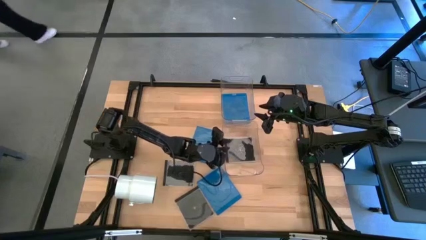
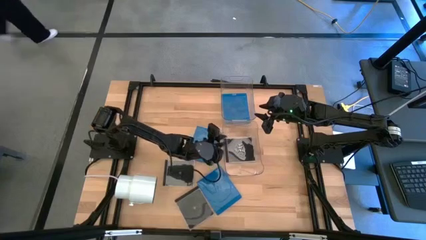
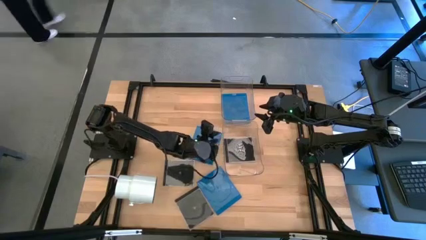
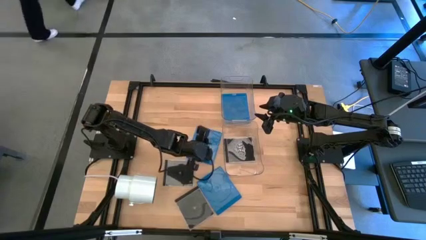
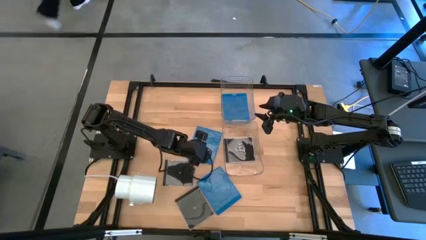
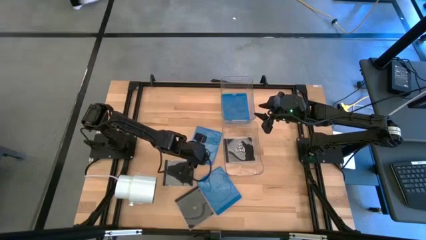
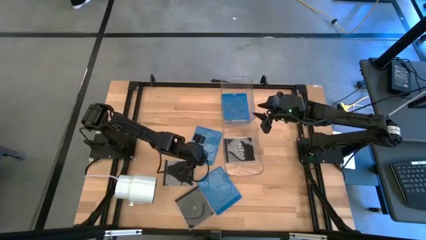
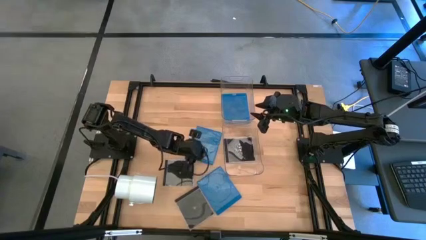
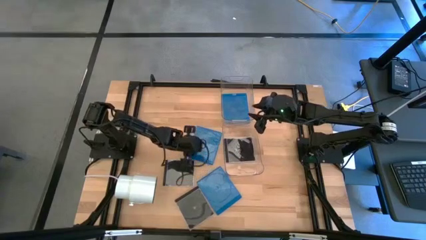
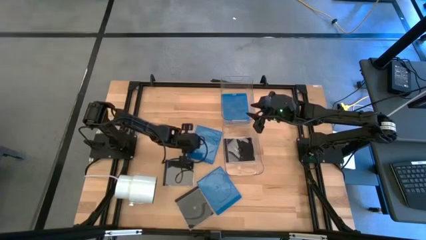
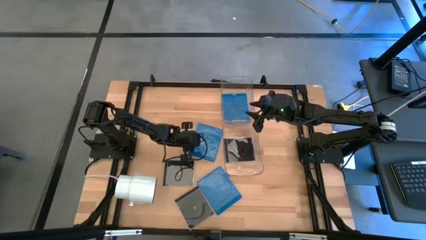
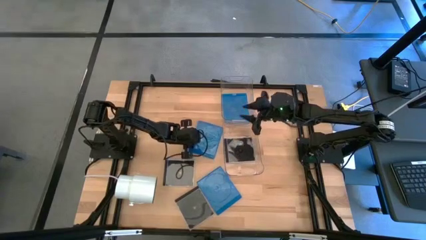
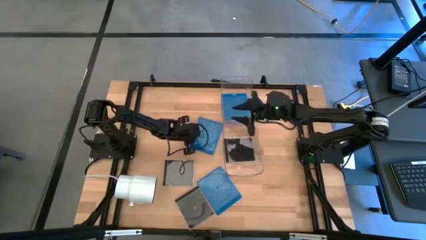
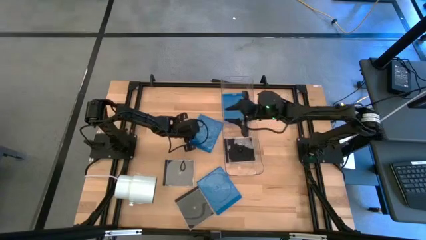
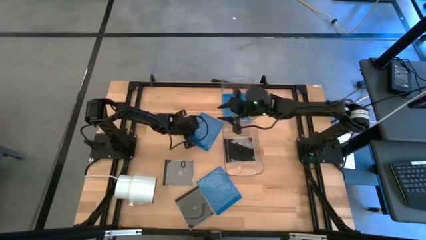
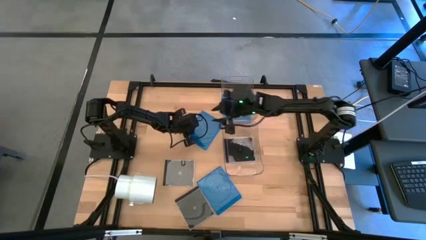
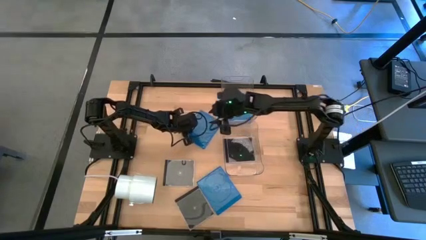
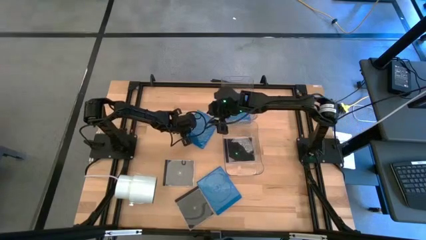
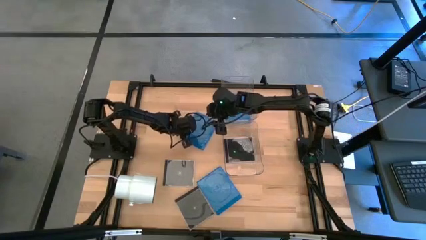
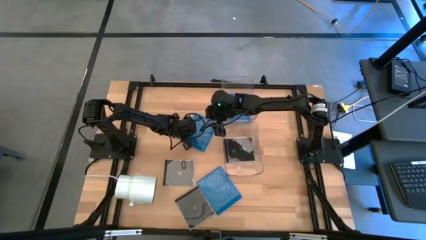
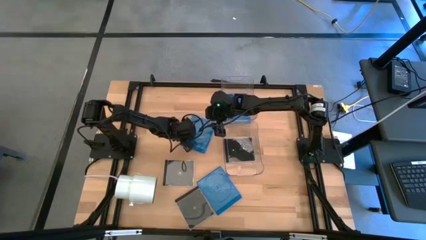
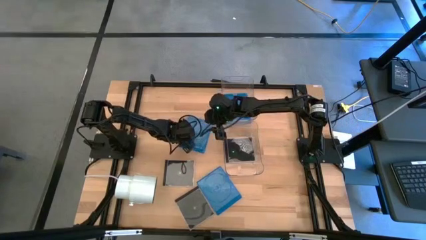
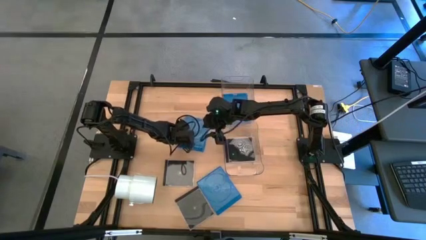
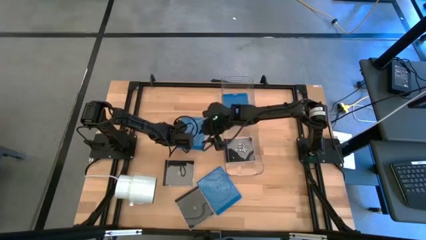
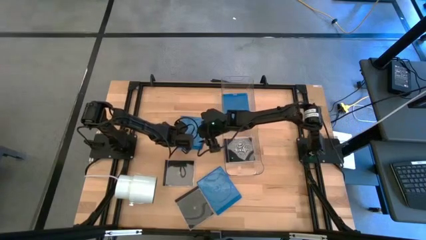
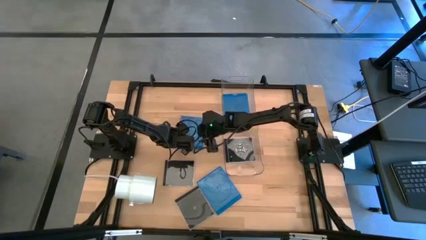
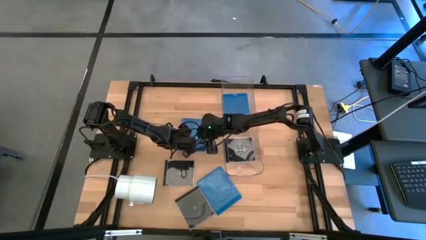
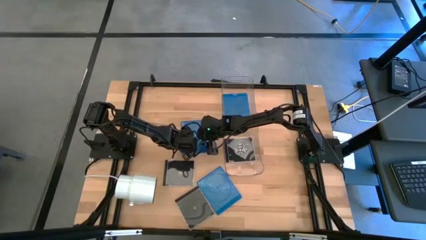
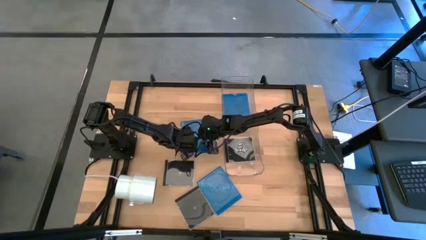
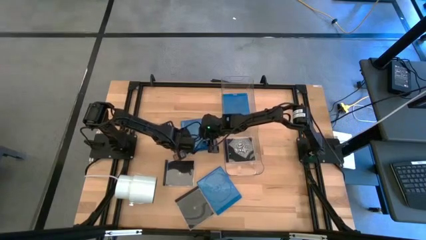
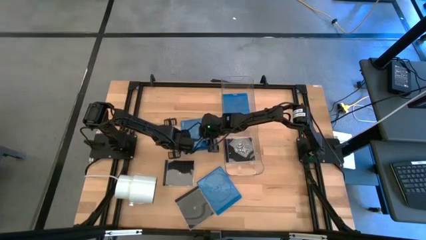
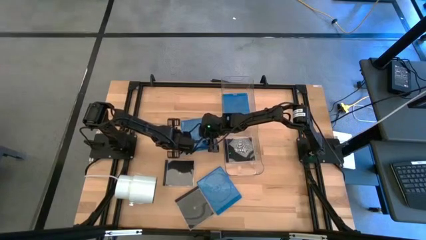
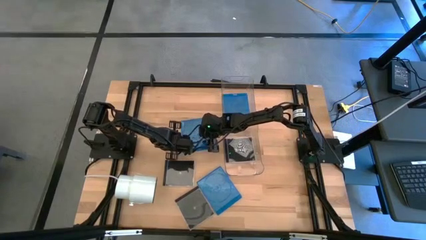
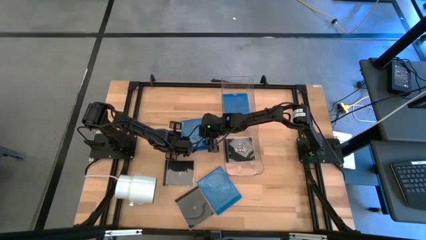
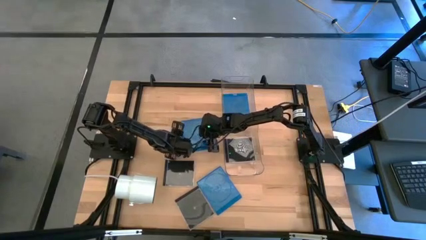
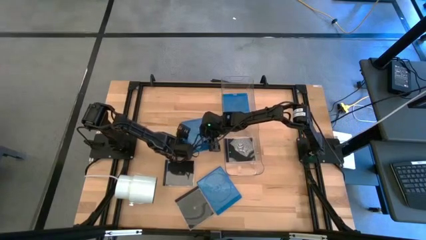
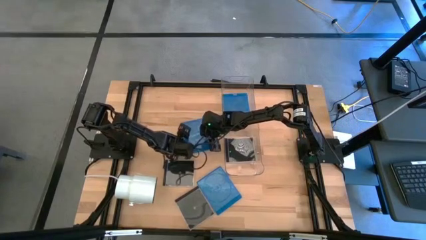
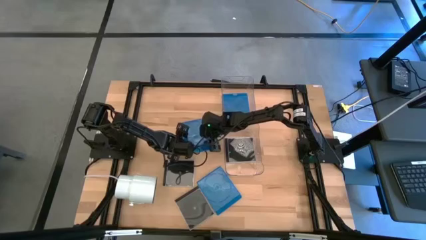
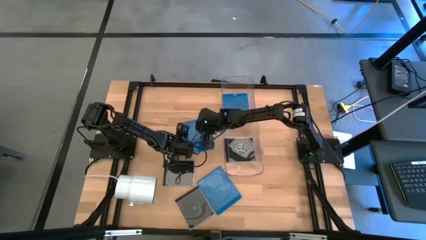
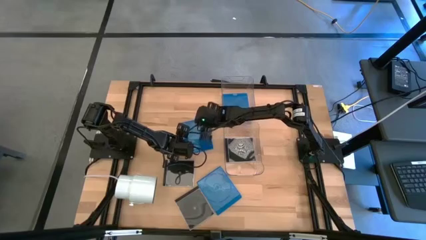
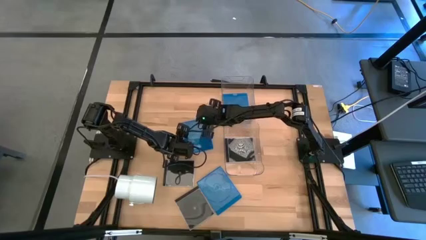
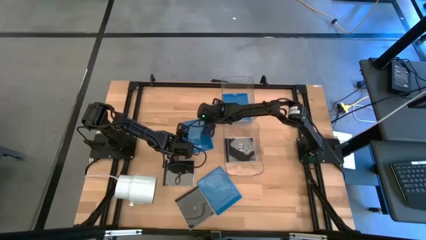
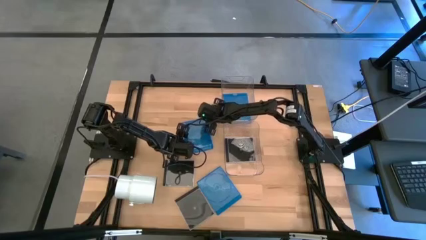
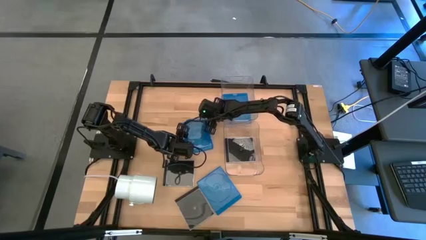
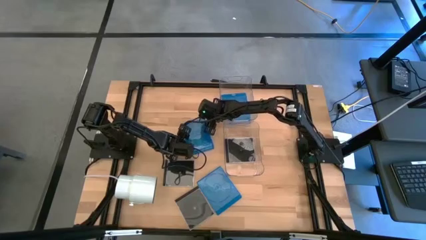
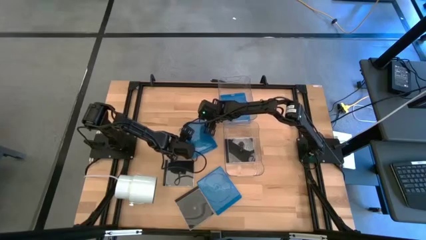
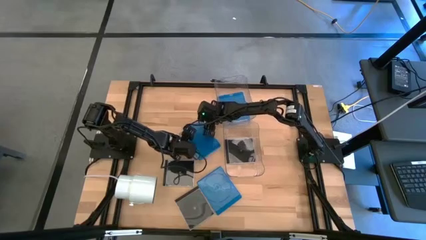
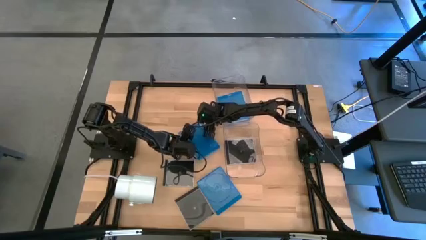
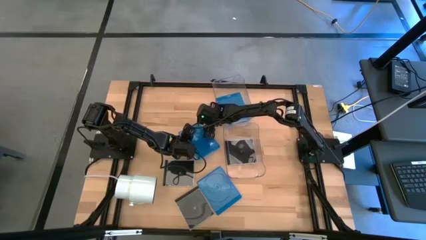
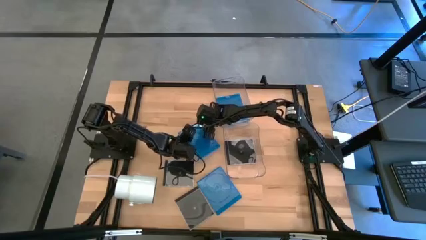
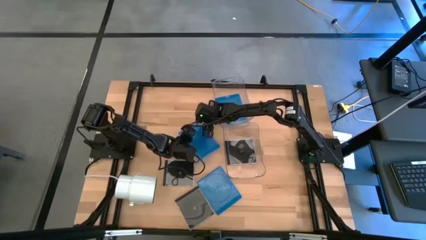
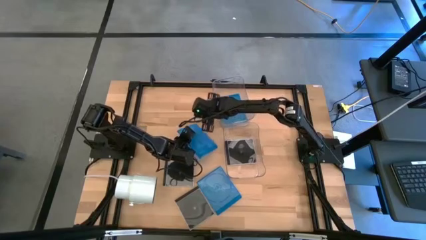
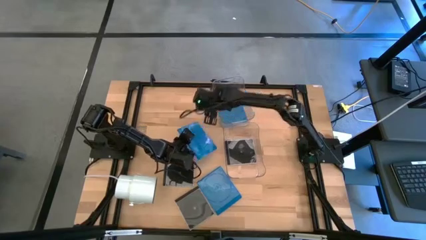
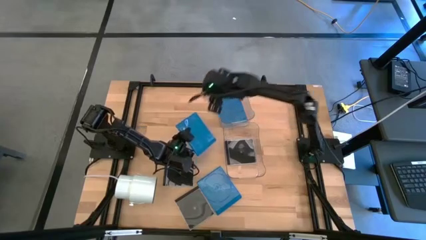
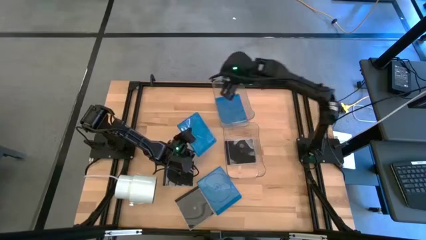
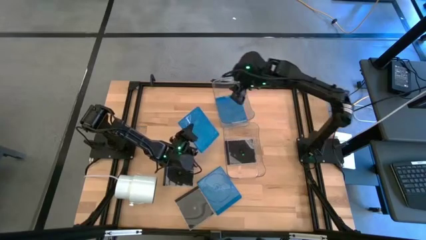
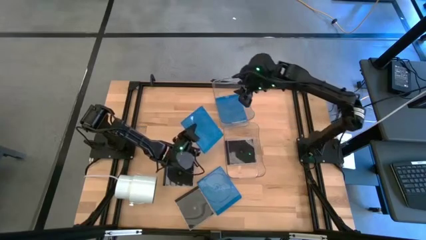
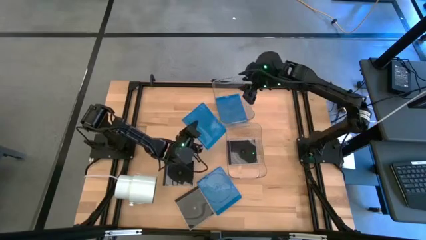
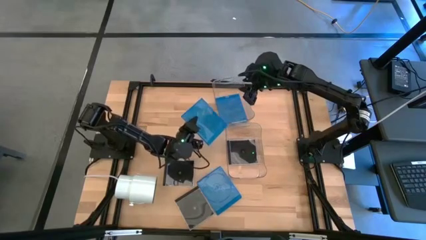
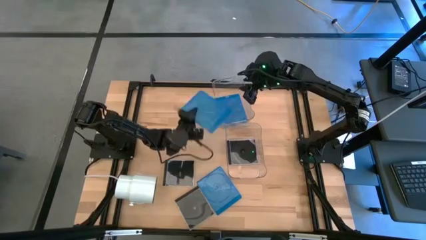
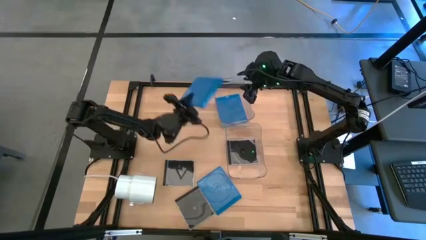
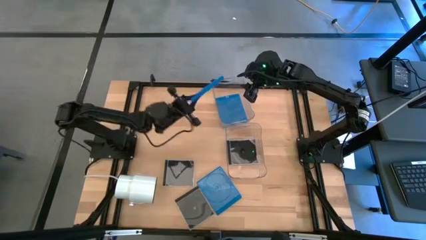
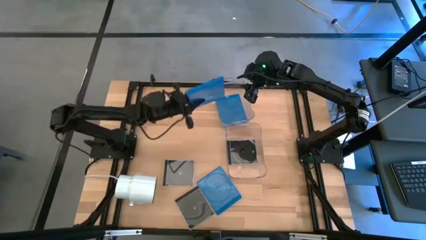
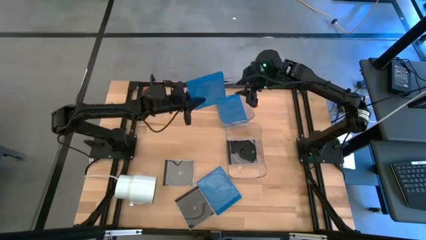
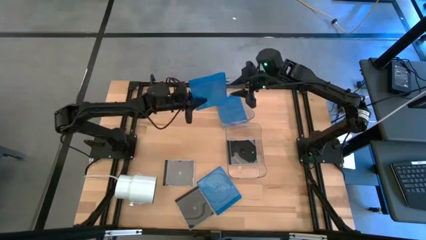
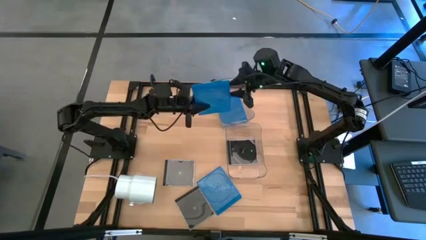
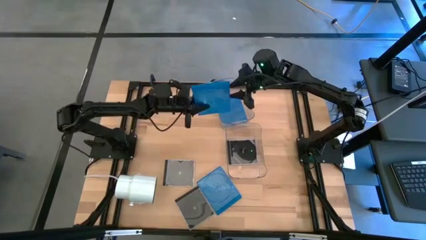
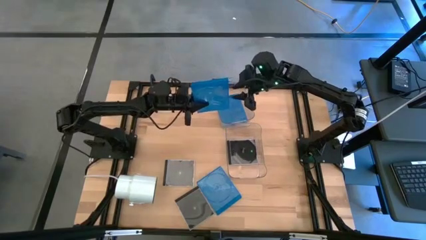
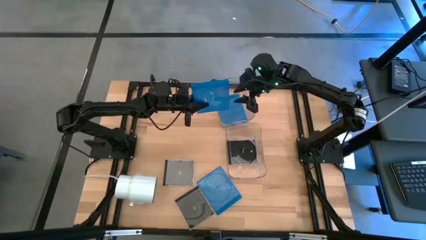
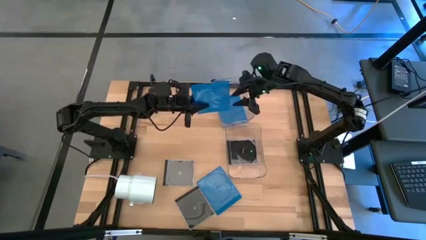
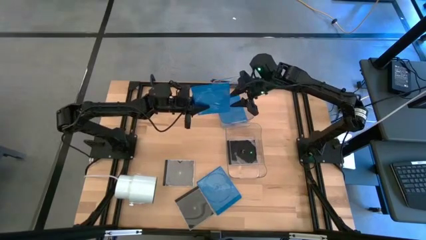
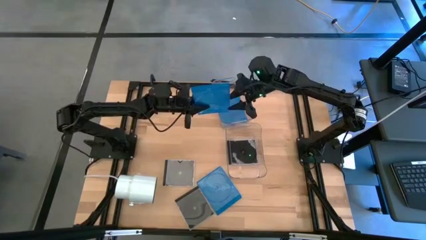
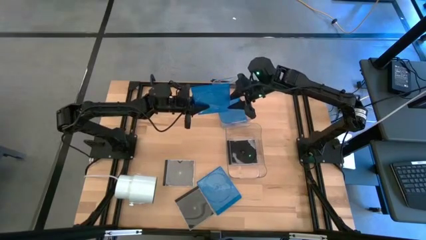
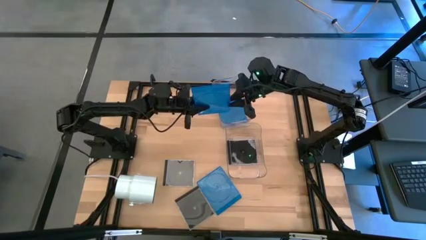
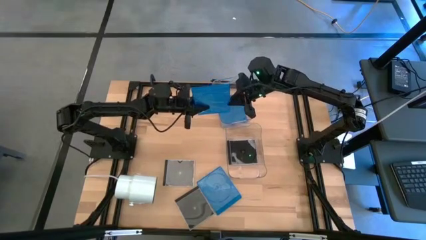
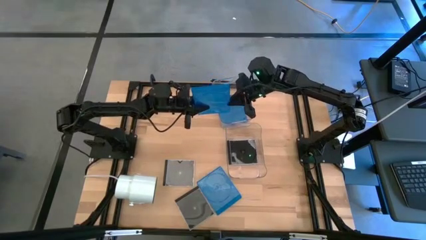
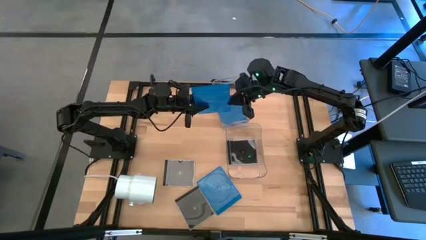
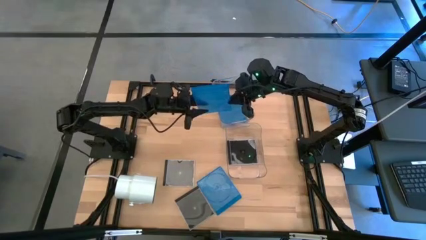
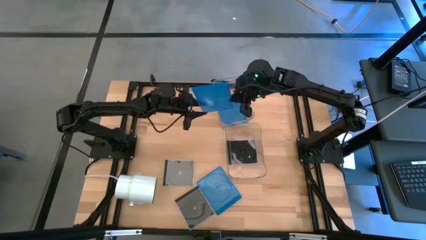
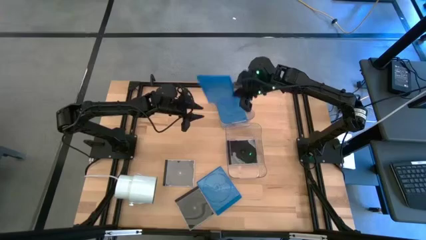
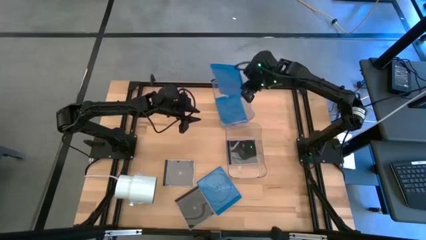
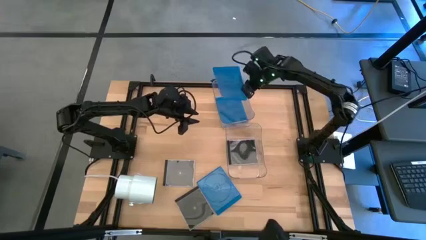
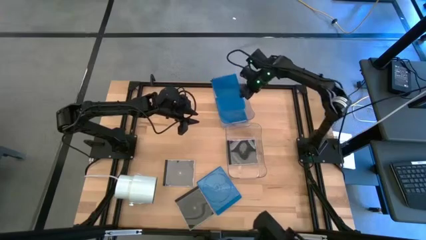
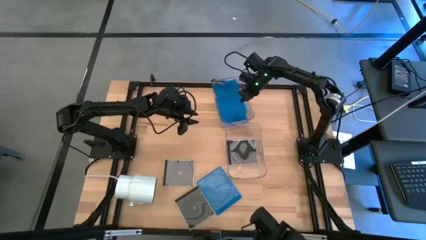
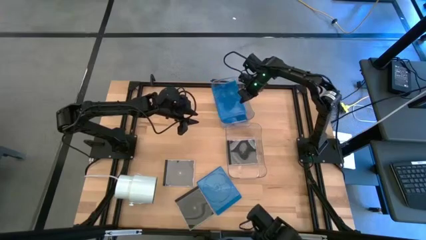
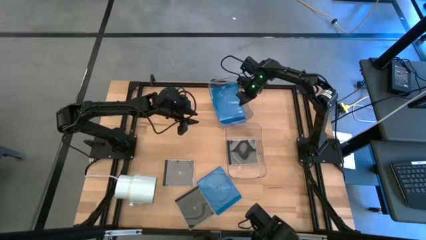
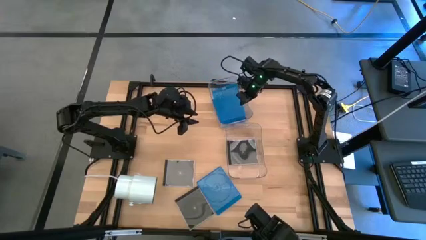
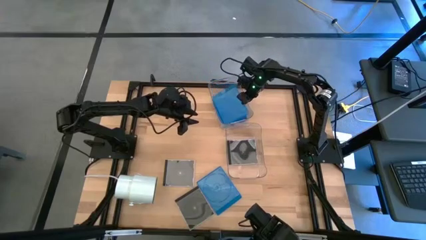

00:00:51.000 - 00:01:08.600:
Task: Pick & place jewel cases by type
Put the top blue CD case into the top transparent bin
